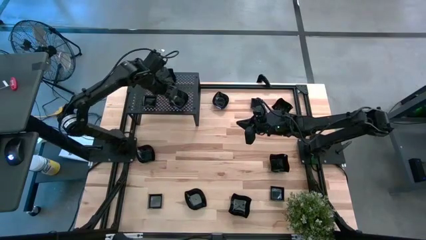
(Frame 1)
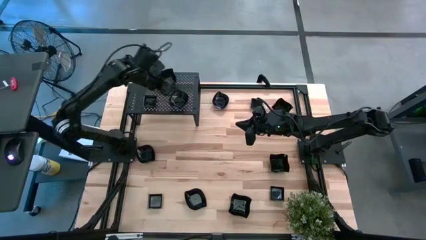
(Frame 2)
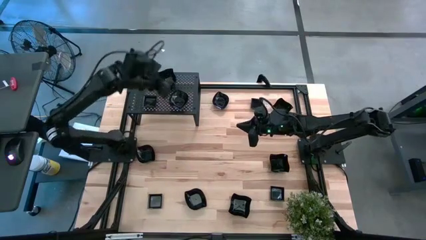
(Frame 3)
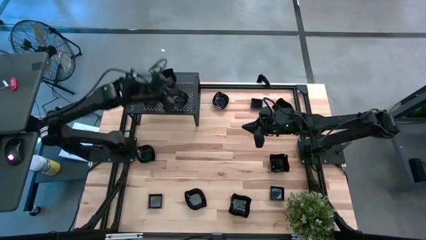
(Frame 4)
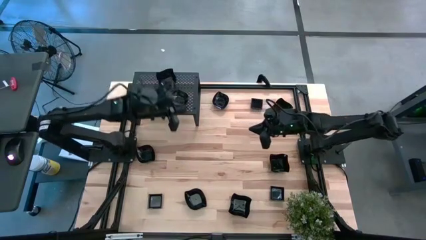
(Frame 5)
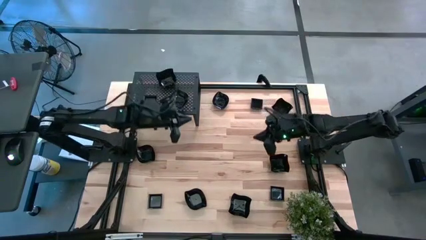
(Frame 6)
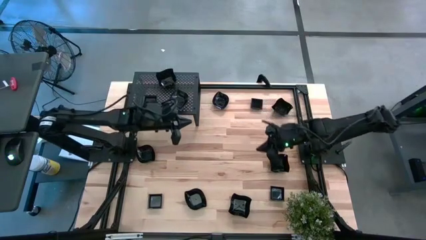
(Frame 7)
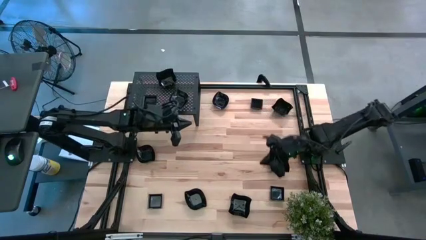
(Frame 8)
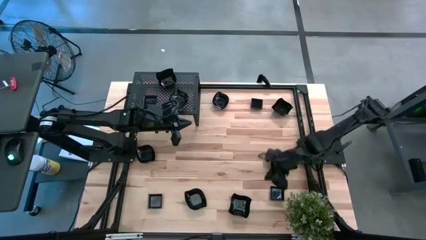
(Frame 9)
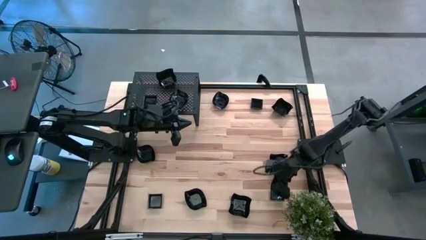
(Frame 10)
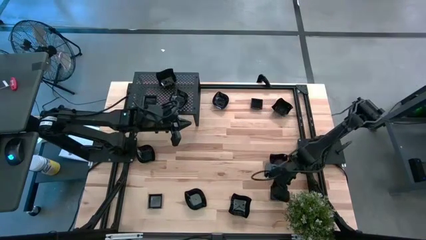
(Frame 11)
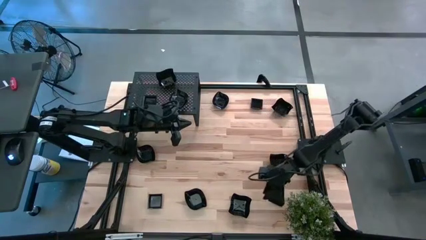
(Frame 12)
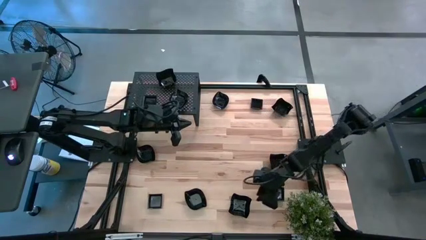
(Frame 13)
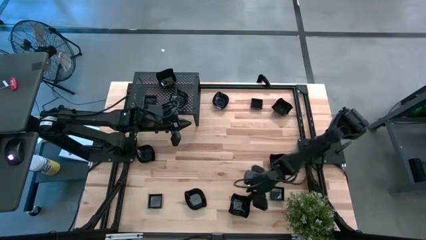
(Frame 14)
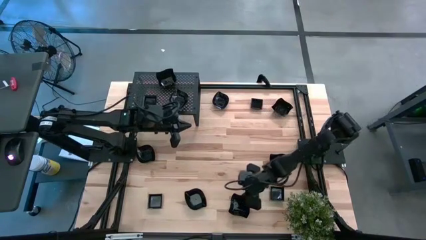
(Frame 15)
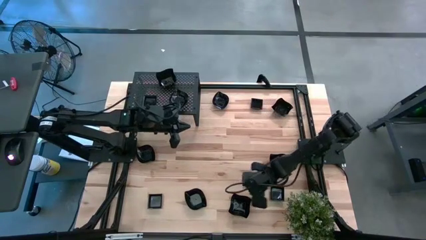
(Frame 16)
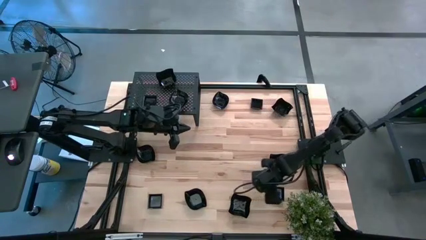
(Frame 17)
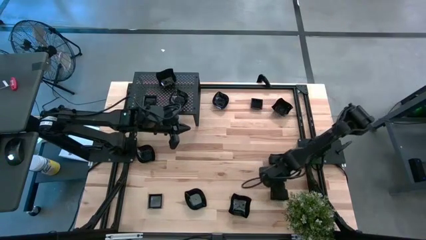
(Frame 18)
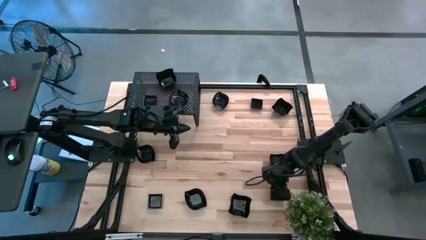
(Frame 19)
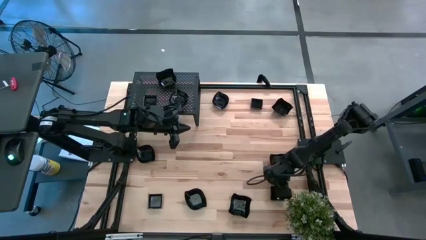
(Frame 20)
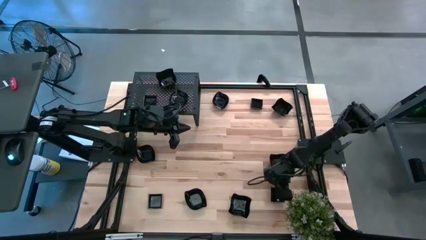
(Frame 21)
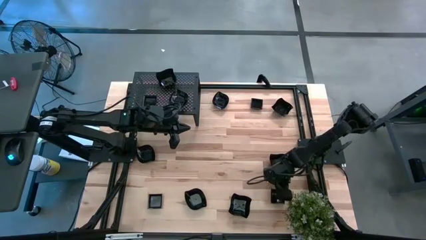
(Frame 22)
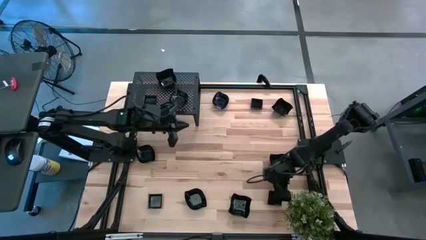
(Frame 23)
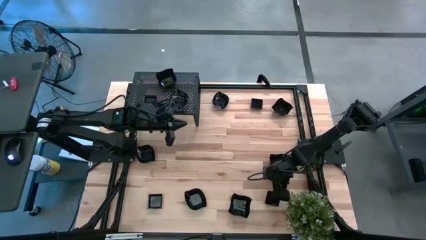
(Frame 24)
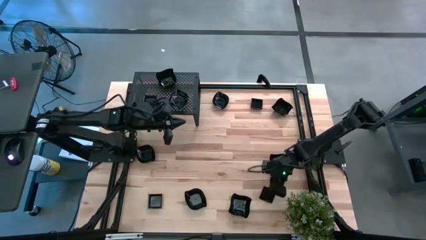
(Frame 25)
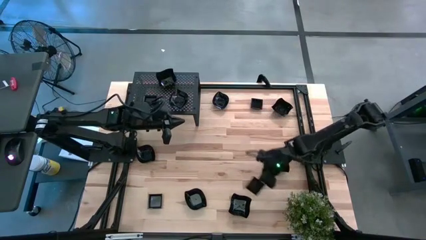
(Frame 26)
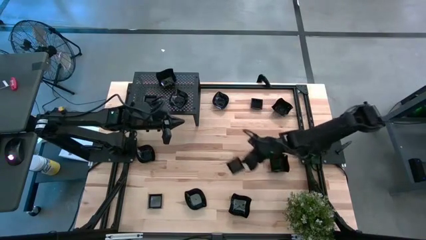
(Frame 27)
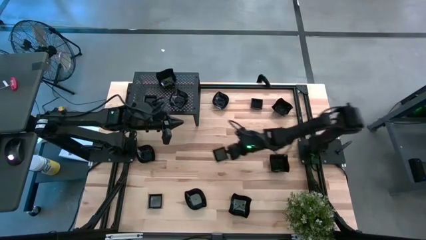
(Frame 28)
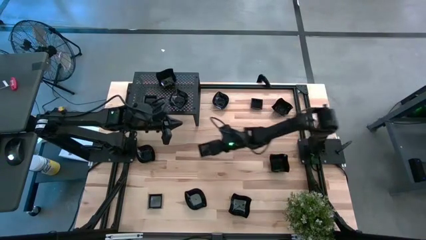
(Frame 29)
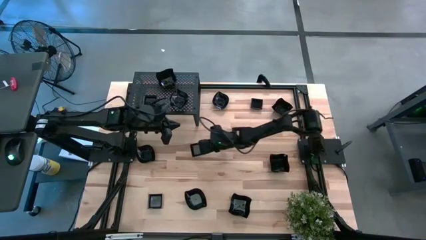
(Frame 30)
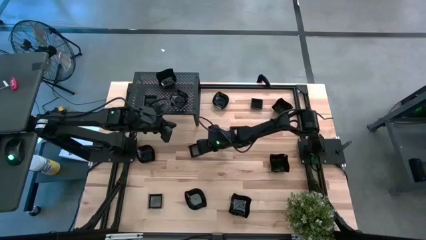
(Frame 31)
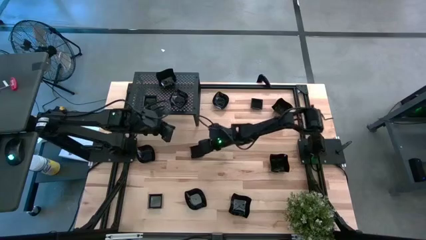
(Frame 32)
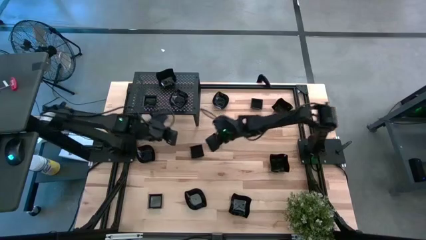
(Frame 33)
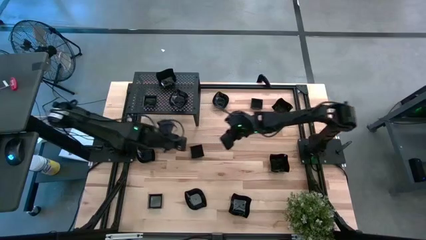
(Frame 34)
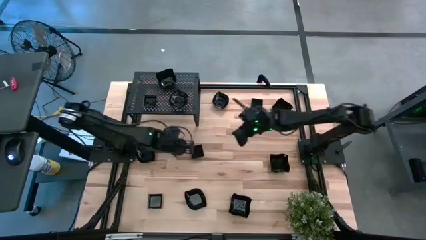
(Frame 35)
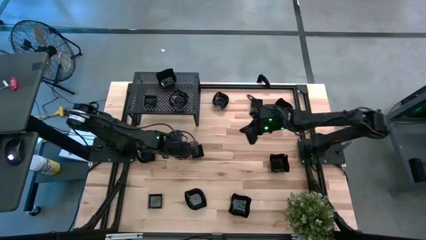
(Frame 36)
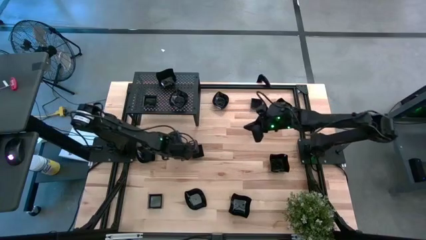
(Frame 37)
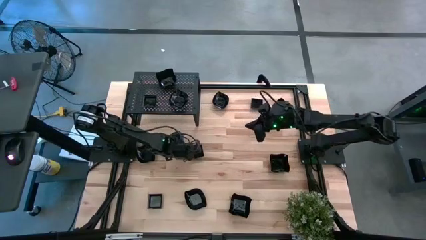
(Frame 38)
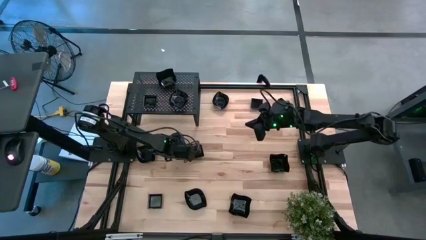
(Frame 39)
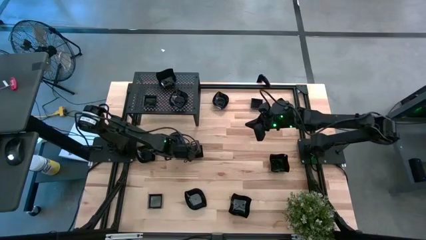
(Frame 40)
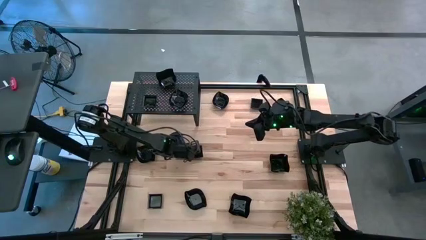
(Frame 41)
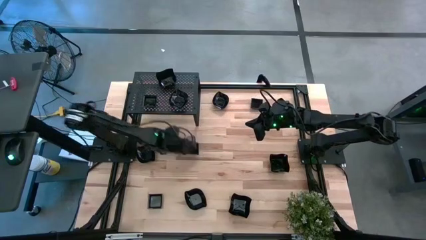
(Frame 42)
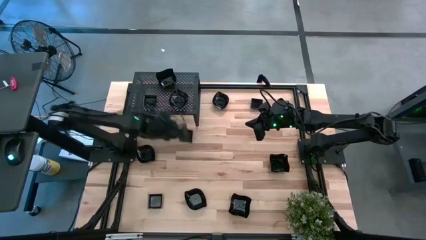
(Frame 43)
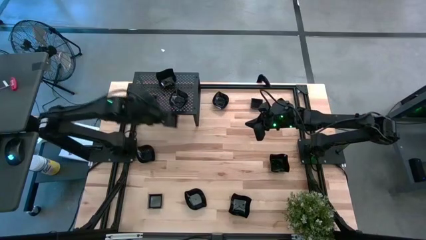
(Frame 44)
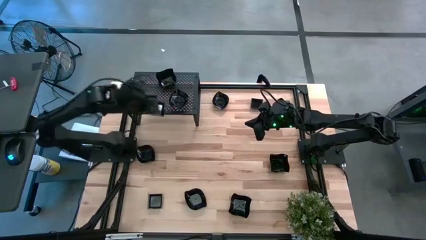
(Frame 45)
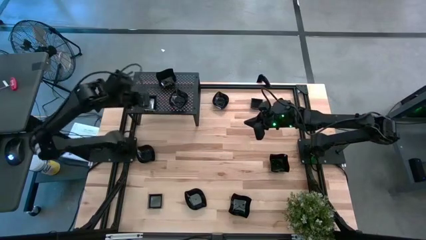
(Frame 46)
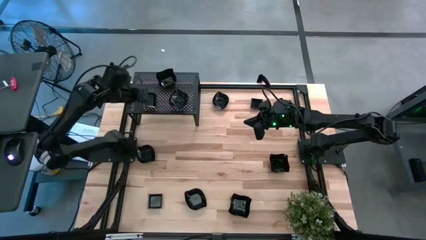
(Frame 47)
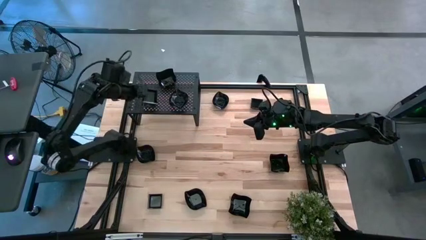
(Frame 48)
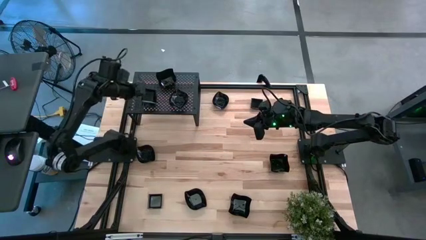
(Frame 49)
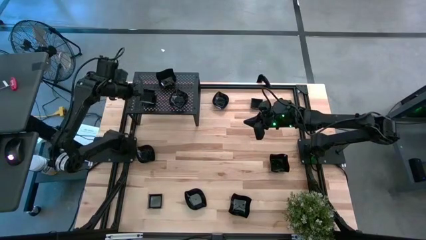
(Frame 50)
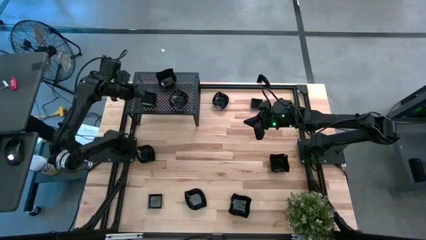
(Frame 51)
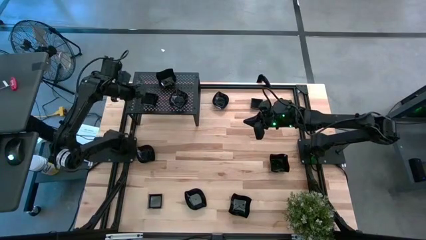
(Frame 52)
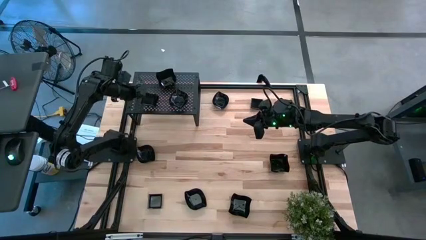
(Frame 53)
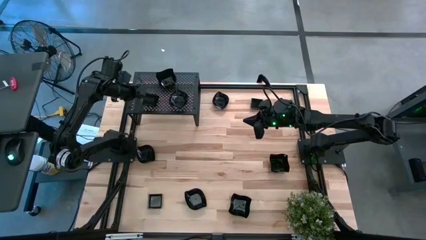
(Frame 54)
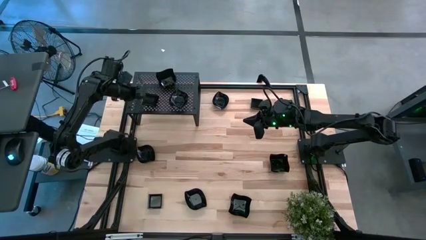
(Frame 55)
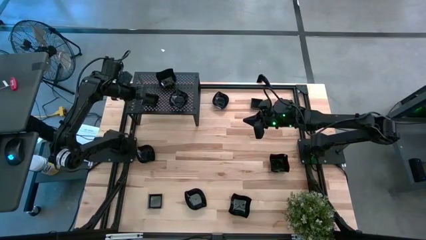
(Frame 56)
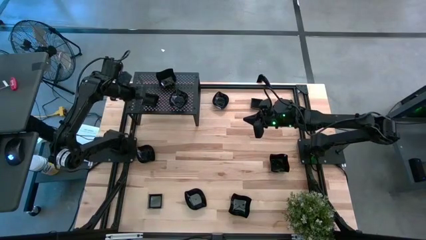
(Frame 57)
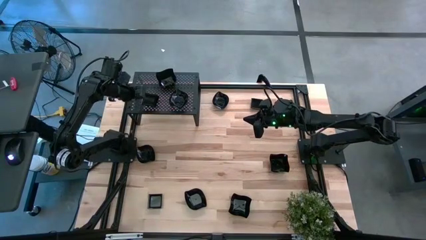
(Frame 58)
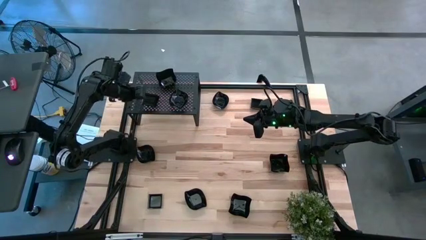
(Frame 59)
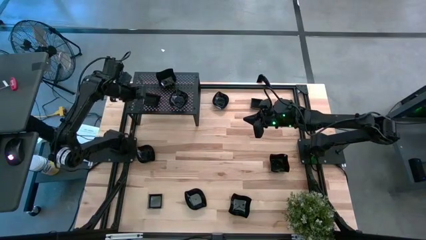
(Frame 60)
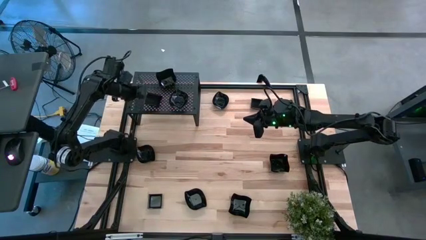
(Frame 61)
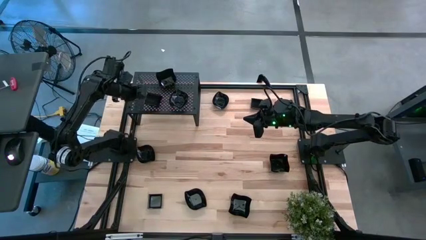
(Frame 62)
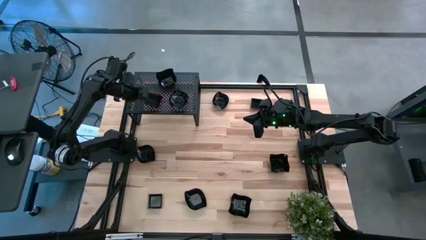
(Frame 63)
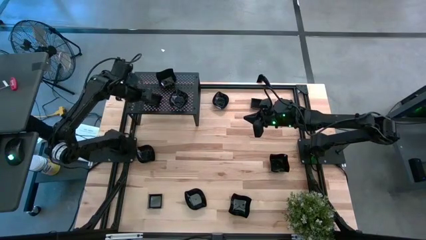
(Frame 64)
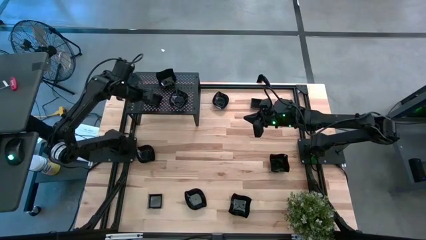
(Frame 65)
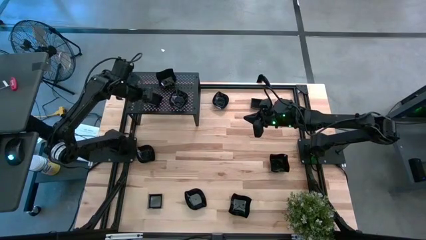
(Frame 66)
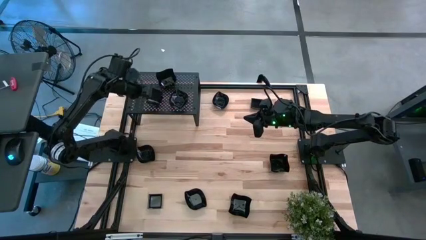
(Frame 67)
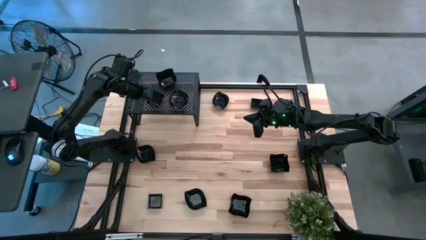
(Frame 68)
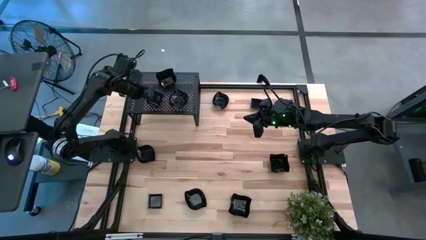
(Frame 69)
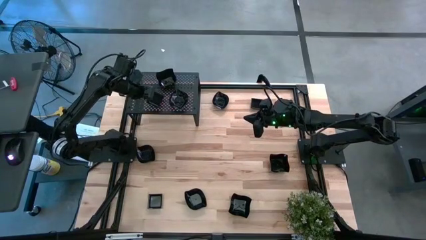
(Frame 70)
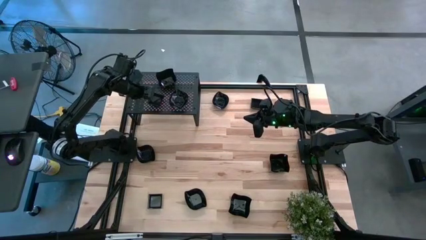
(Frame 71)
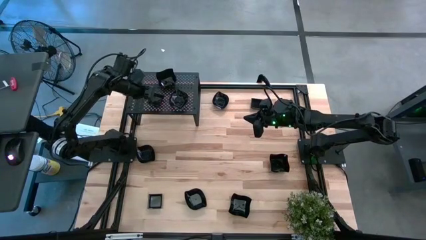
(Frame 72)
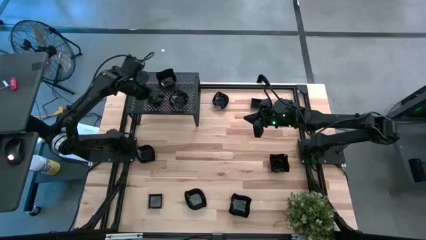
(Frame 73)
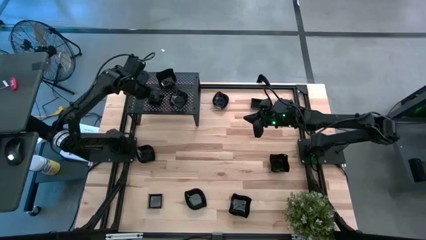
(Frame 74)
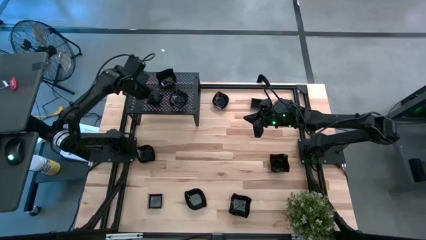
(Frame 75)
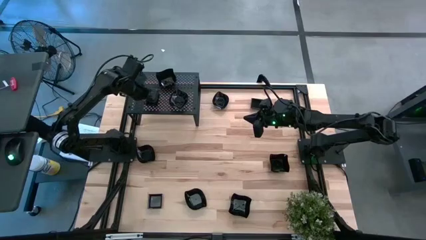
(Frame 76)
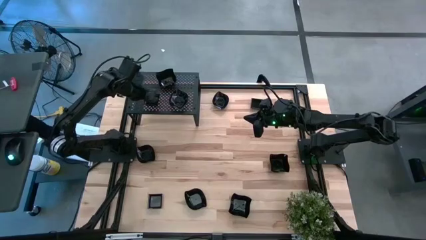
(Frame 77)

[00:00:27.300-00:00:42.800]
Task: Pick & Place Mini shaped plates
Stack the black square plate on the other black square plate on the shelf
